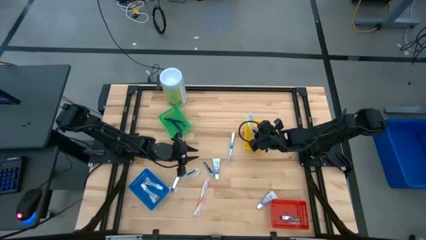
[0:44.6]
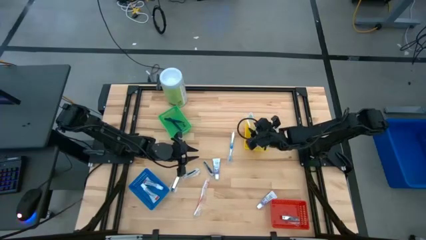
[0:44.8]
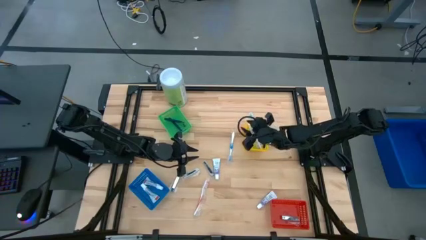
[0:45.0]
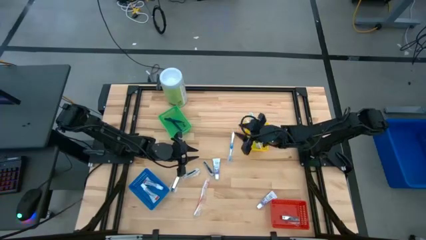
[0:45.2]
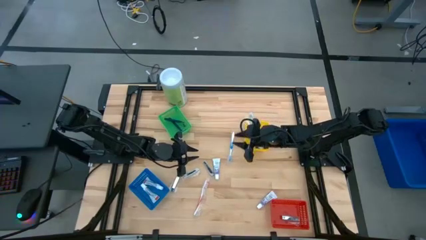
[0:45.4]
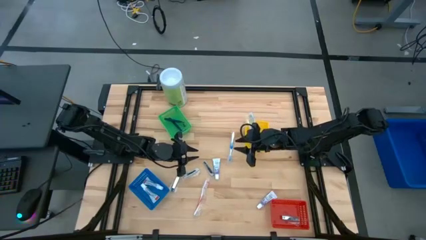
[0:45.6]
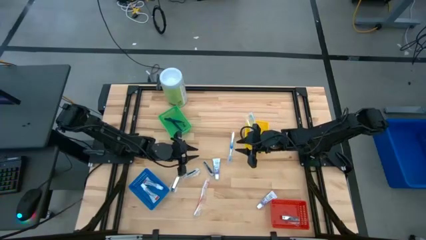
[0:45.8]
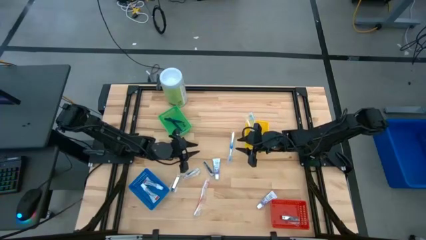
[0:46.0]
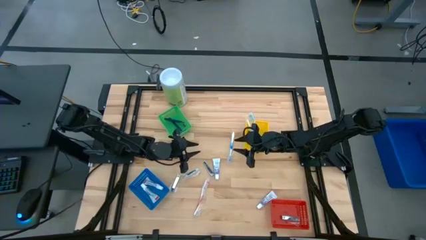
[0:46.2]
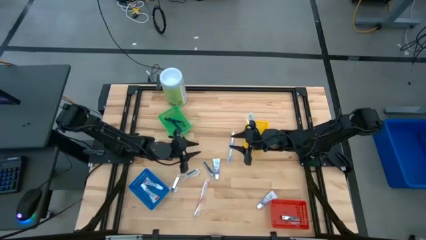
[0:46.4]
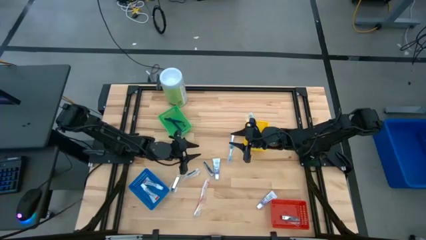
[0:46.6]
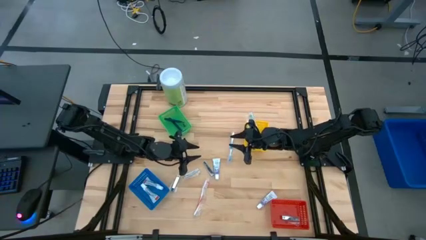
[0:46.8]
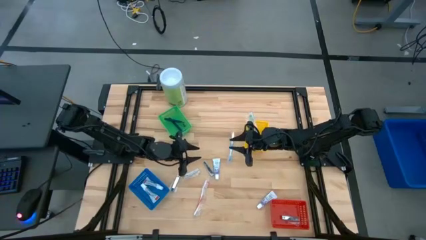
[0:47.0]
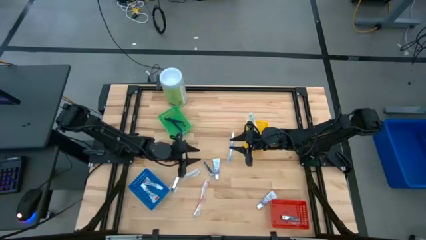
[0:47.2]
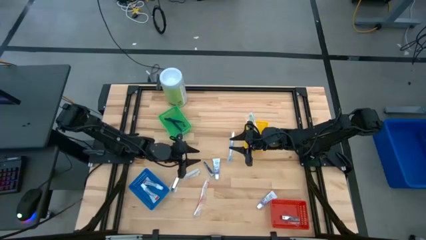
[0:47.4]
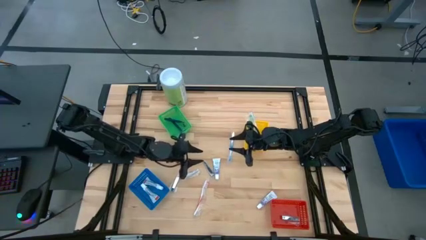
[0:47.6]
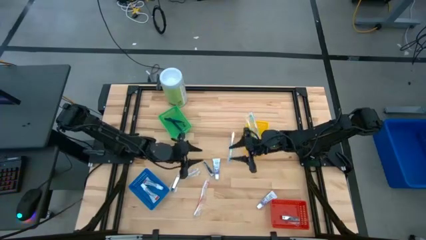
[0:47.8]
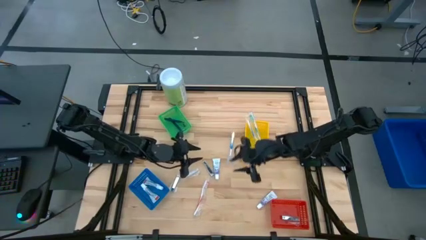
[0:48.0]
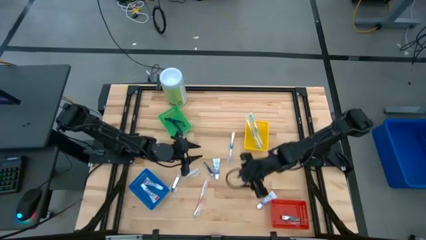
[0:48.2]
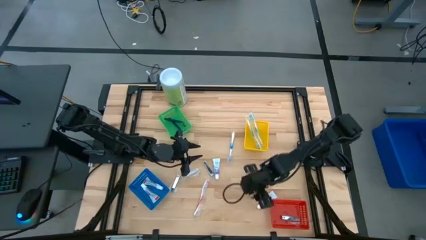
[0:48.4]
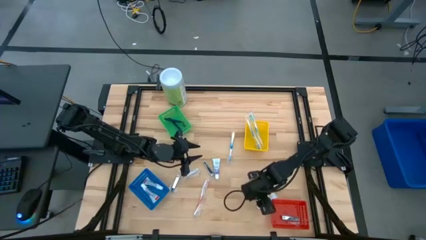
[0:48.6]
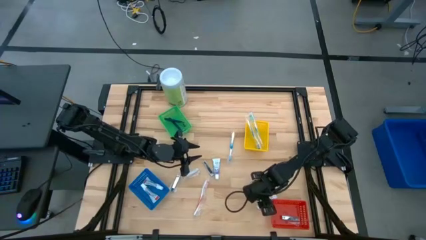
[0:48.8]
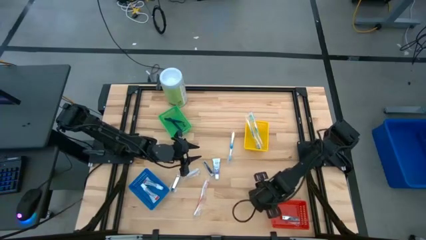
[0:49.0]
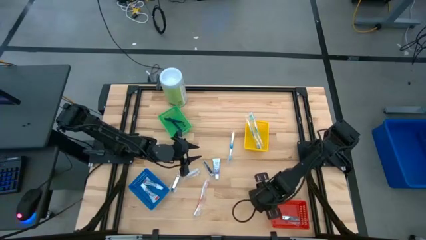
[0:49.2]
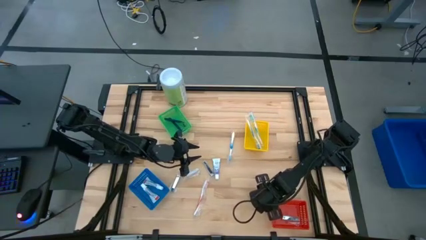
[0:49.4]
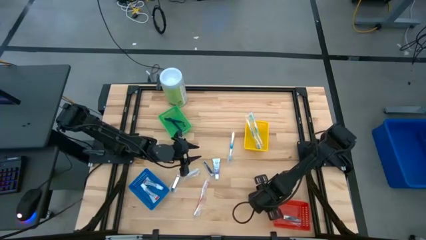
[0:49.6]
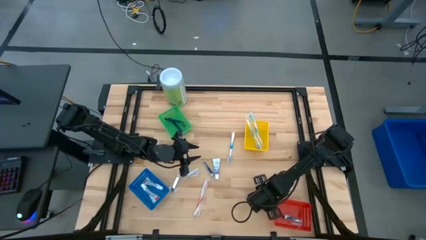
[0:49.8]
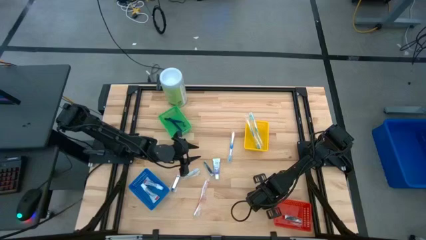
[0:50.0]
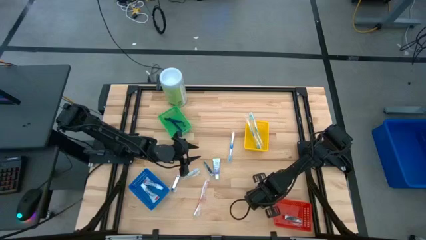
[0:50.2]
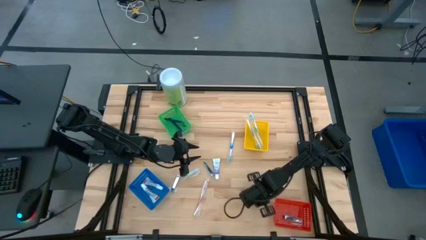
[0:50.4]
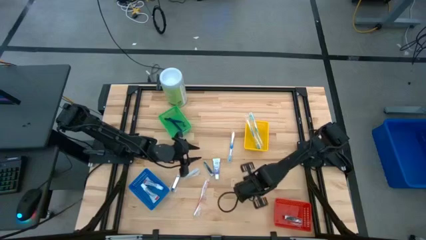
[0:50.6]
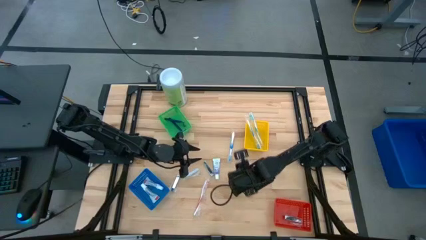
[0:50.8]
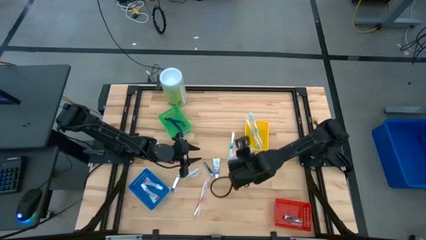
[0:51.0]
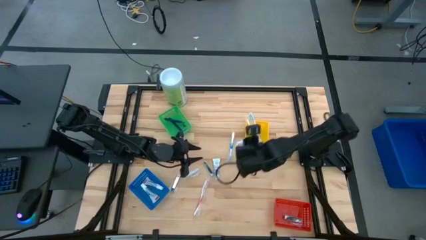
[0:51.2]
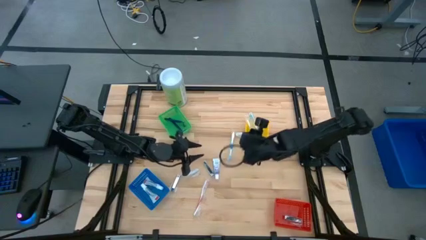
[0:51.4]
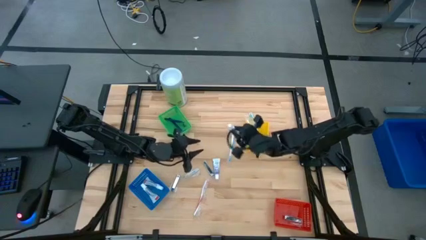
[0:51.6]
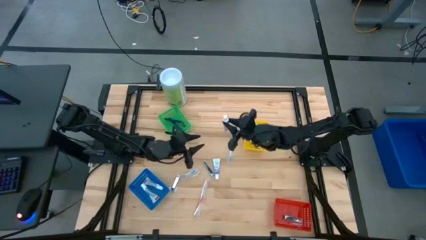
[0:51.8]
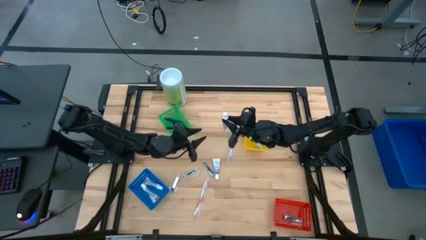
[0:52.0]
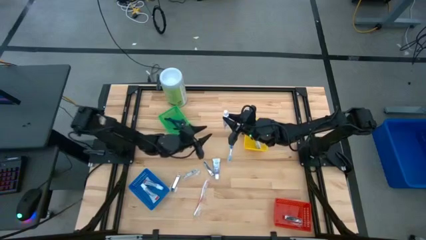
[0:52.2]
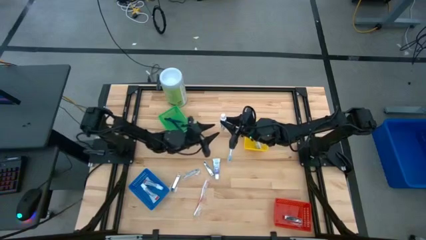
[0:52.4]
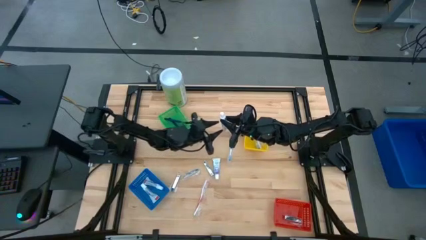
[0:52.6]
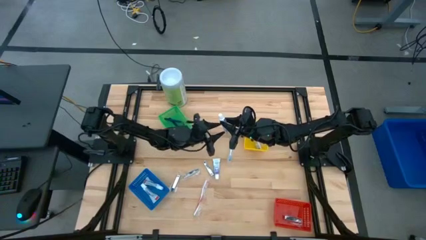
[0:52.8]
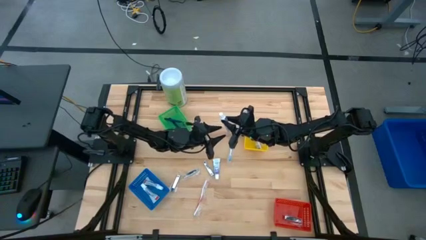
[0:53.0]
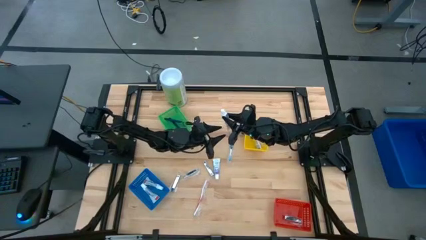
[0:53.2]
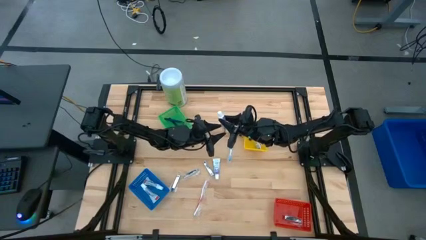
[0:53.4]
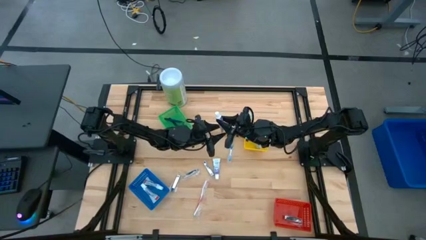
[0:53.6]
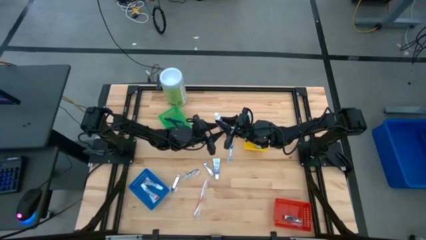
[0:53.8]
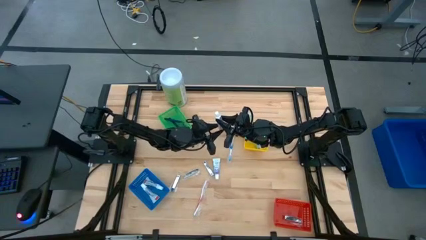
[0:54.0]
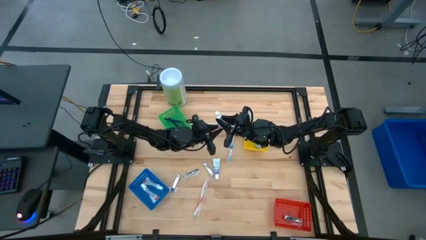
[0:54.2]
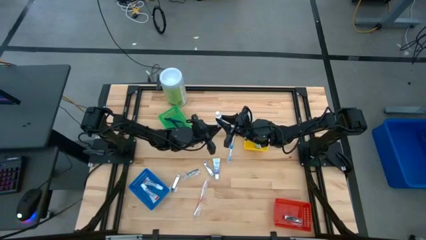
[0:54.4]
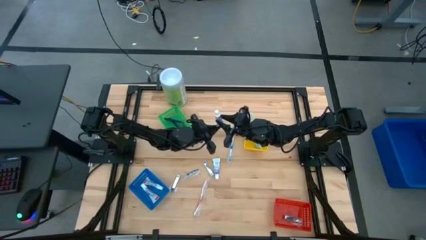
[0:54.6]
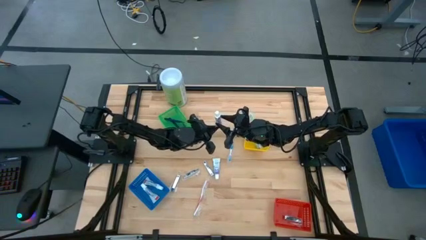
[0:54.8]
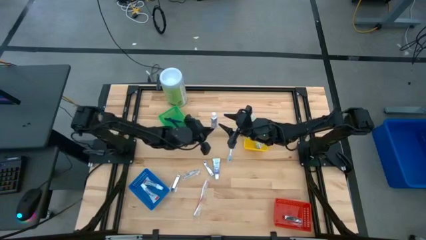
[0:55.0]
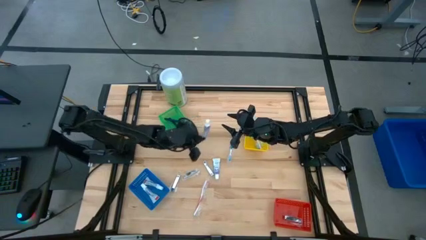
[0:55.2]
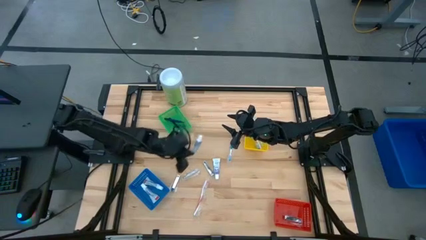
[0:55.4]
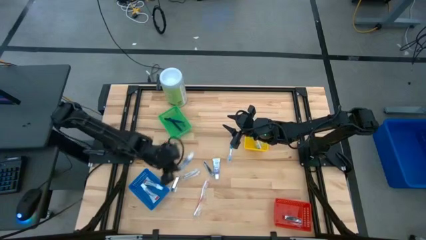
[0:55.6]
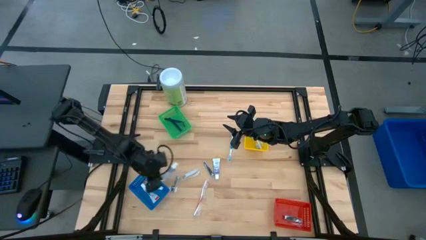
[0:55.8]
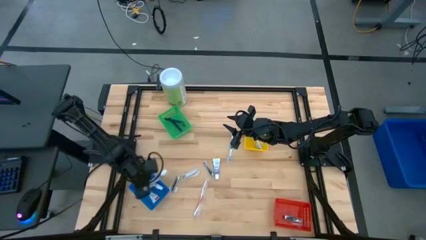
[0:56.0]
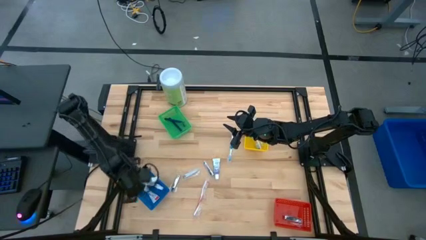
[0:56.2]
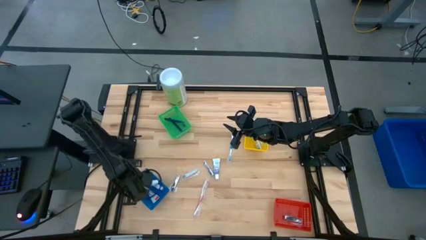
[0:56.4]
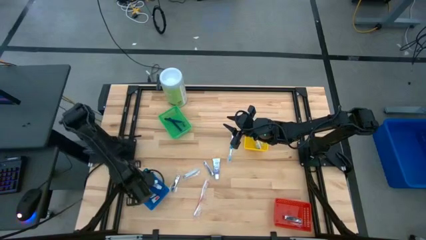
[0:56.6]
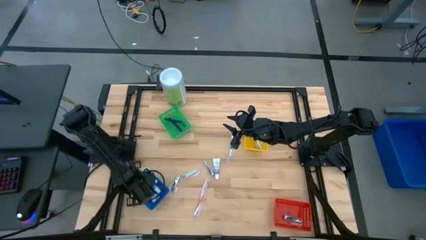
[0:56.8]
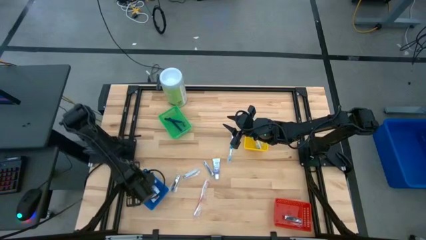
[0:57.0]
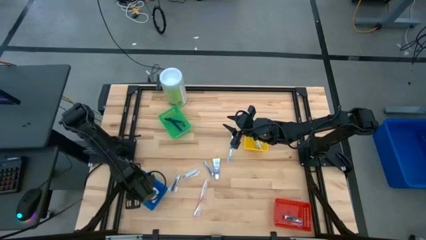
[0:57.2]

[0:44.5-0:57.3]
Task: Pick & Place Travel size toiletries
Put the right toothpaste into the blue bin

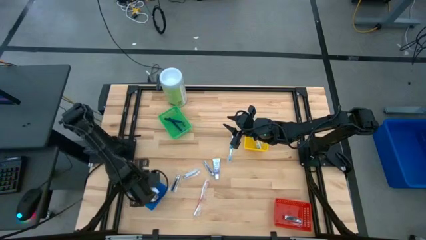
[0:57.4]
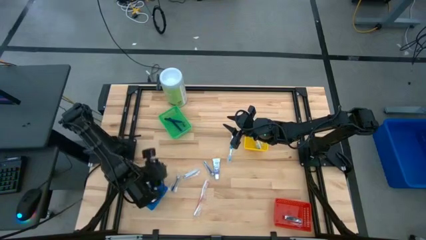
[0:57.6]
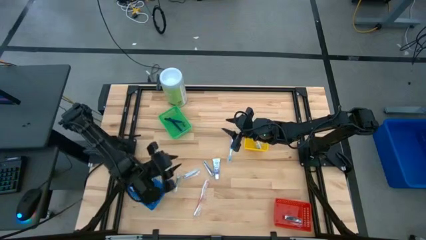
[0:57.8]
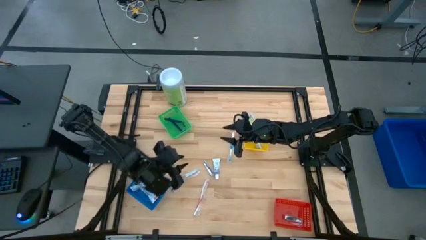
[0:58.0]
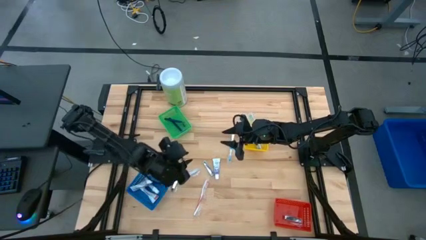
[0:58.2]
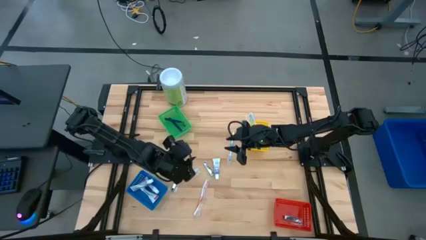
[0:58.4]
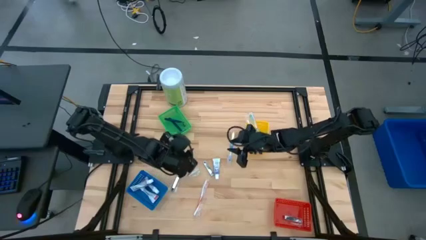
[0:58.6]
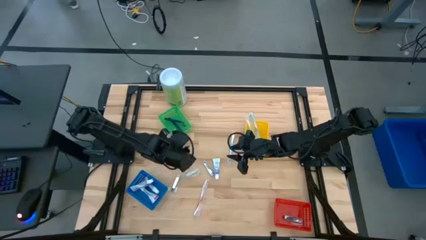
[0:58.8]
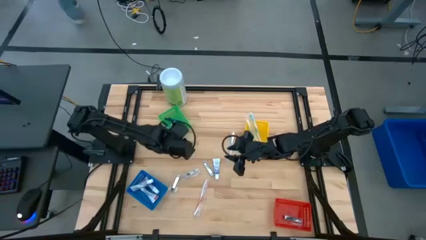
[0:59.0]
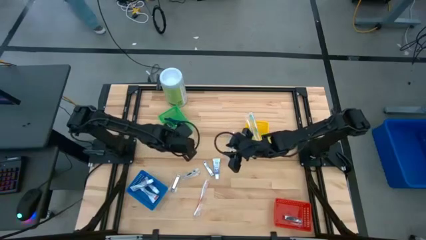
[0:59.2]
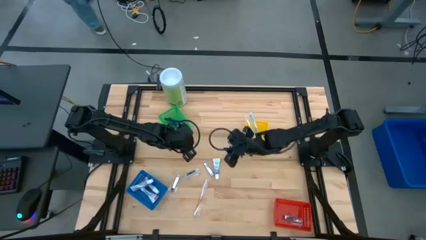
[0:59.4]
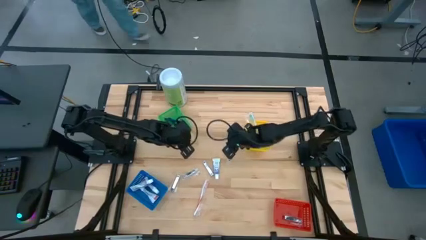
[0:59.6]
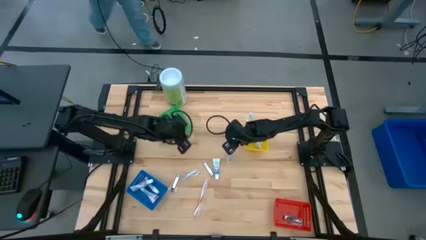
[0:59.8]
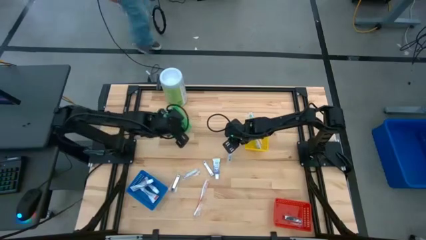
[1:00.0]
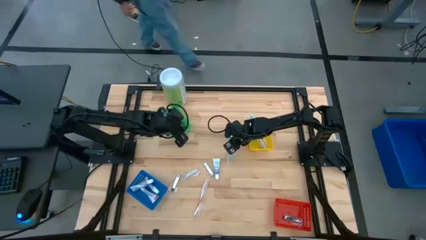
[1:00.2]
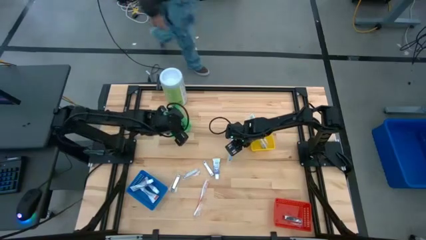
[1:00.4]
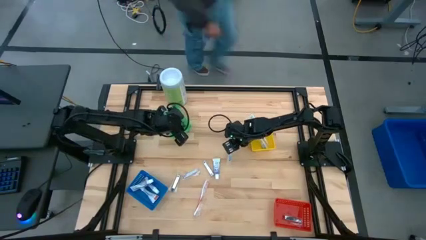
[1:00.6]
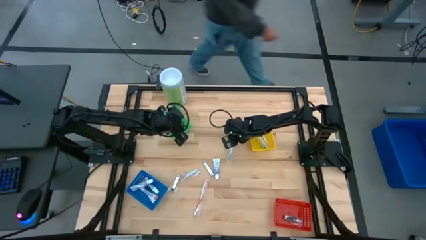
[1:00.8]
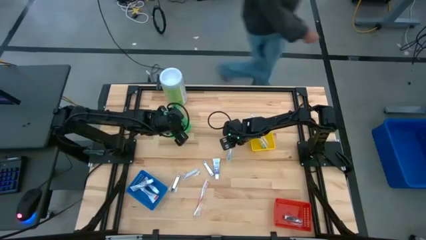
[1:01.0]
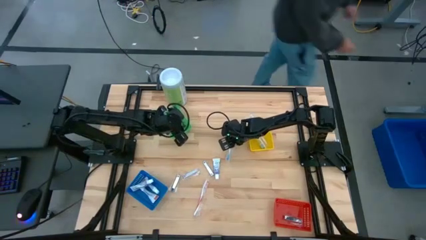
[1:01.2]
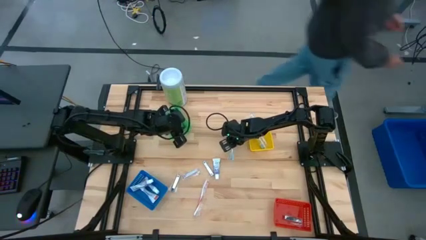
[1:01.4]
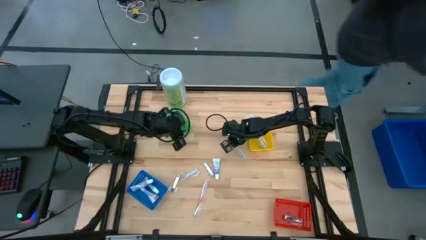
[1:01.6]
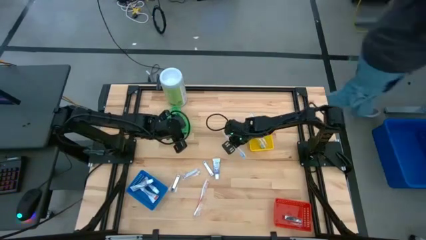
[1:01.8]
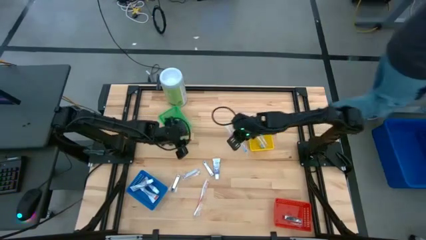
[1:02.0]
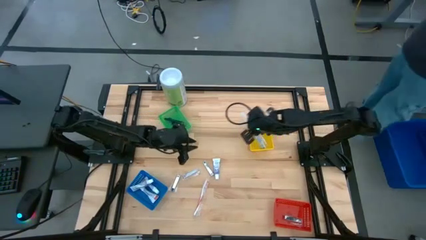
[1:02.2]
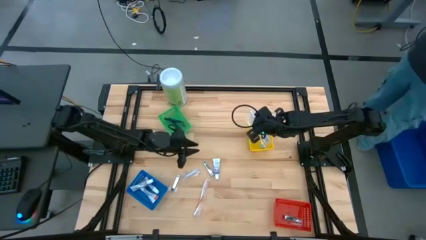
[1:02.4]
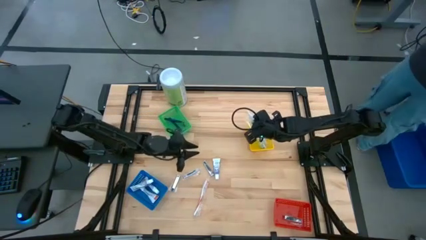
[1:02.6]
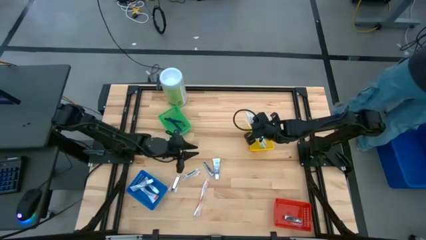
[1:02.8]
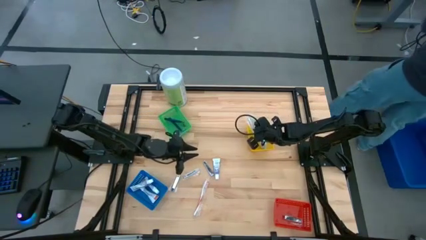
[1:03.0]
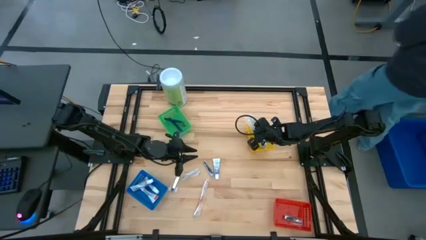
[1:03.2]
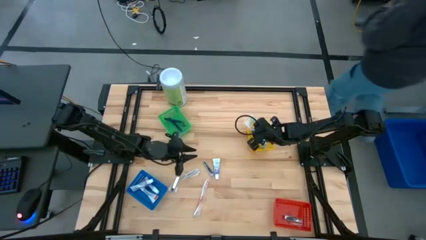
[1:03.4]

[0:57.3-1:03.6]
Put the blue toothbrush into the yellow bin
